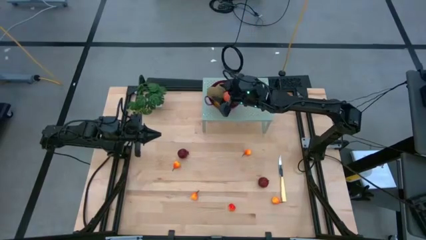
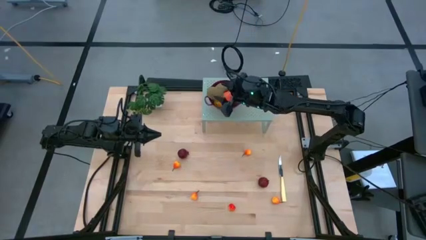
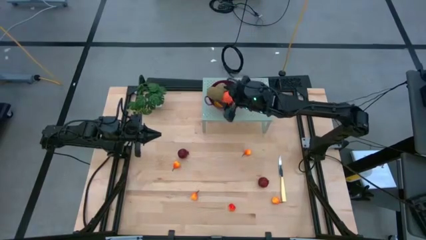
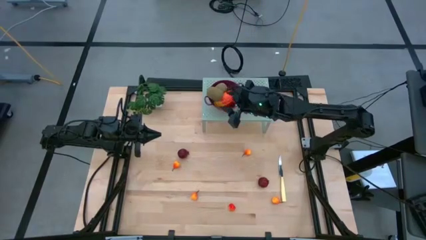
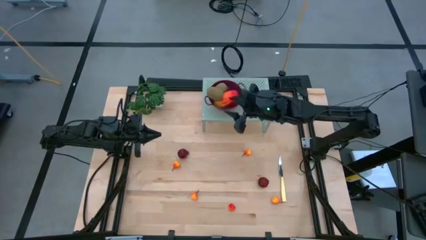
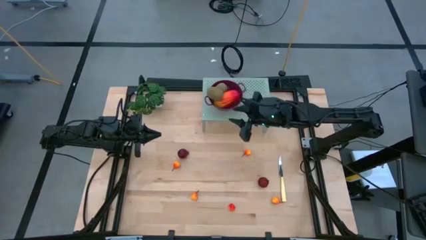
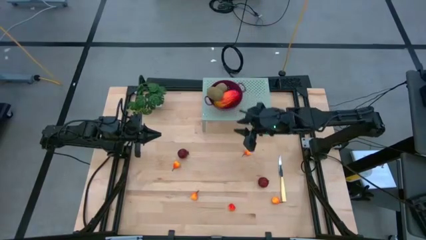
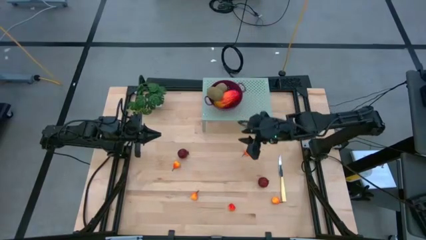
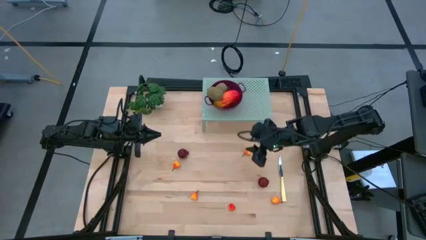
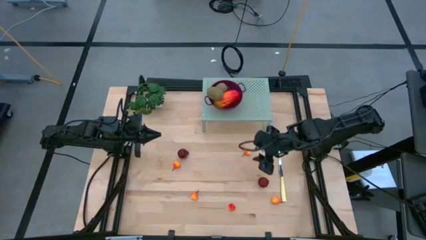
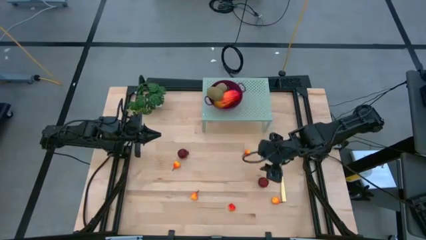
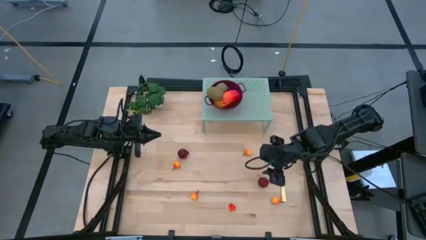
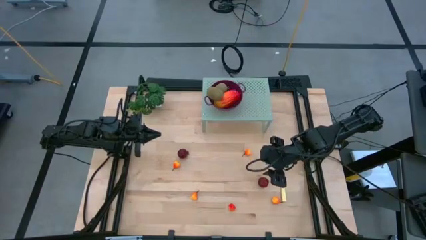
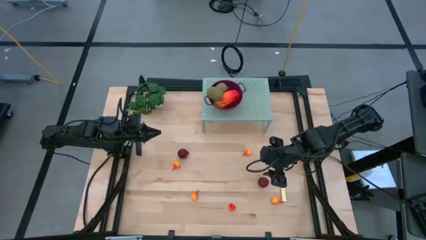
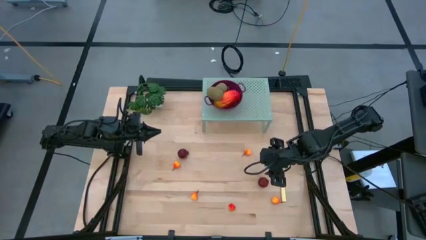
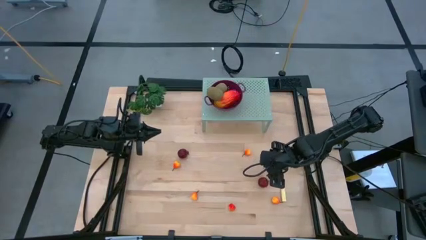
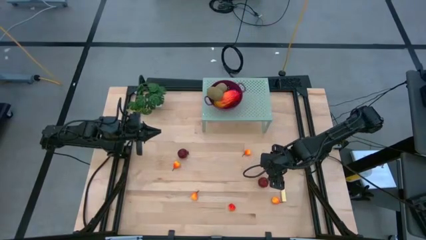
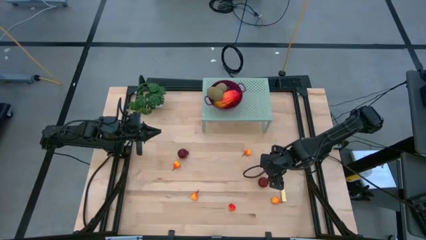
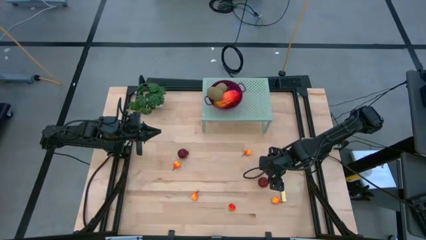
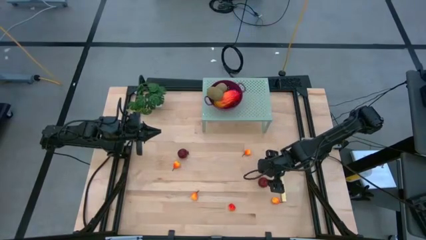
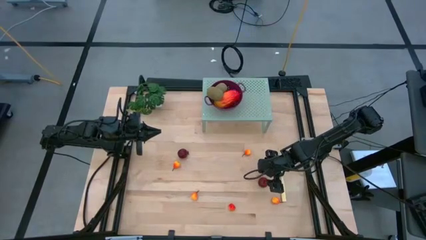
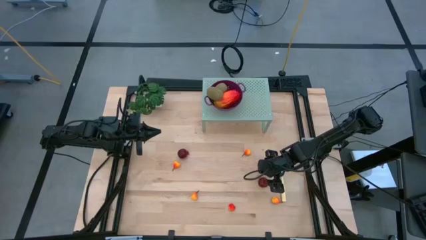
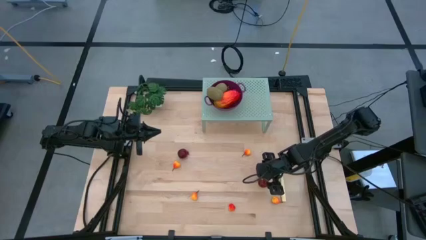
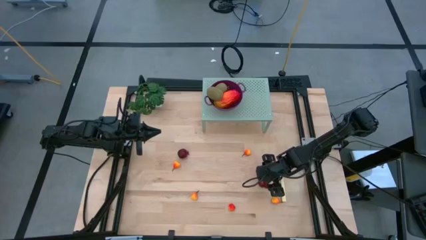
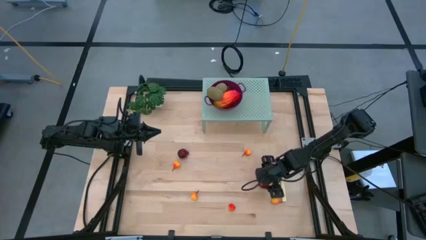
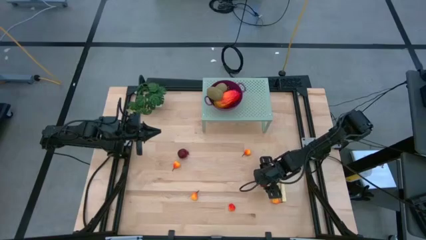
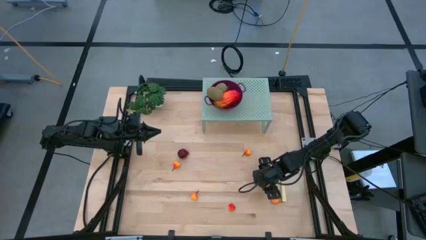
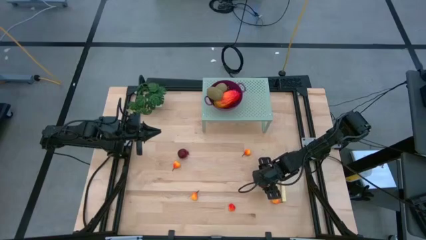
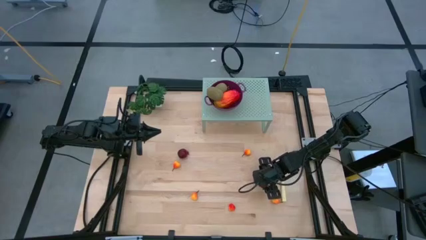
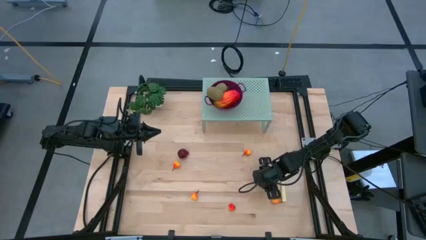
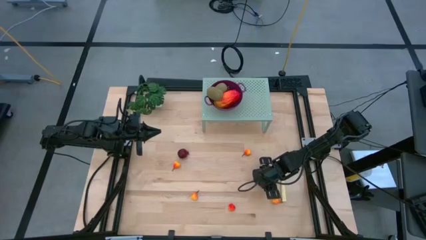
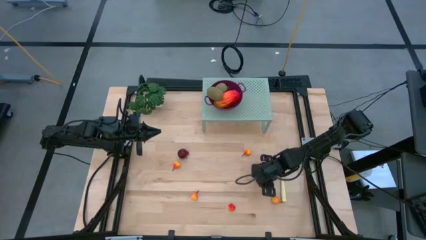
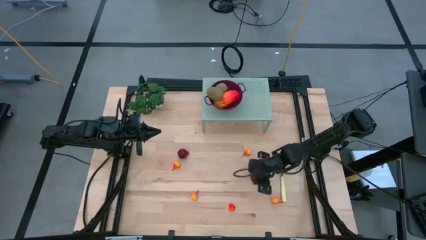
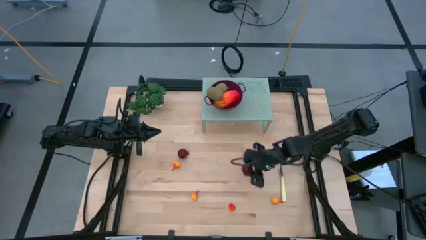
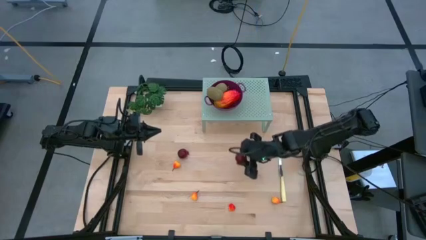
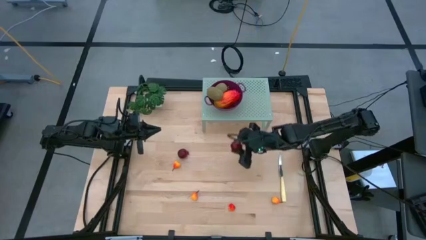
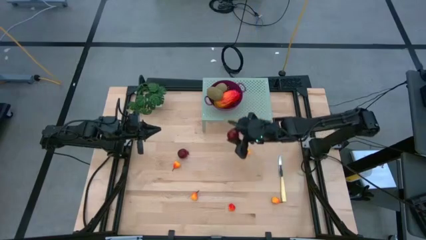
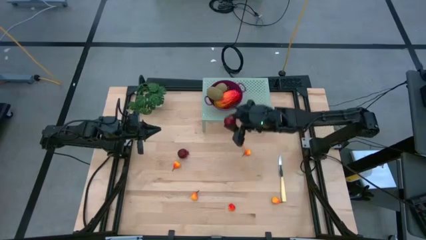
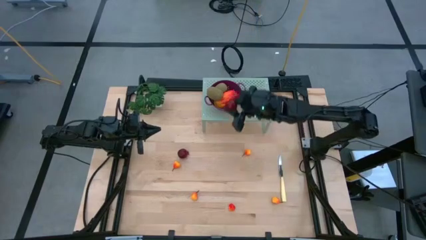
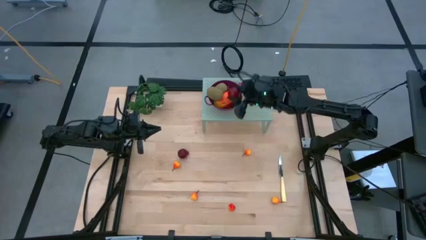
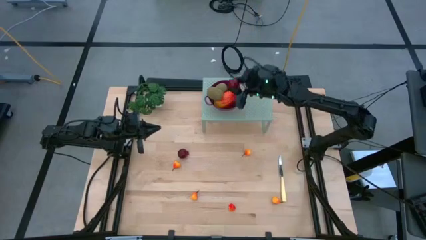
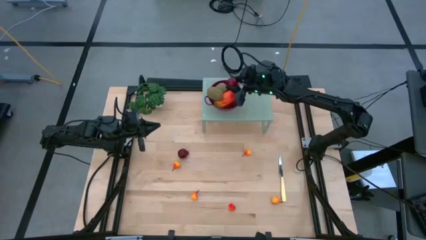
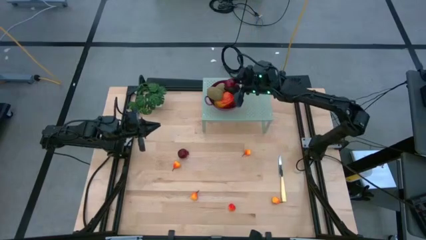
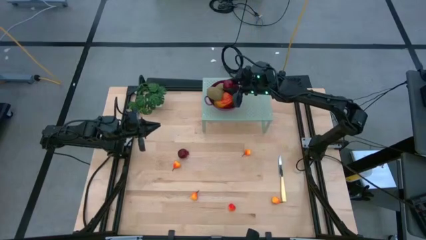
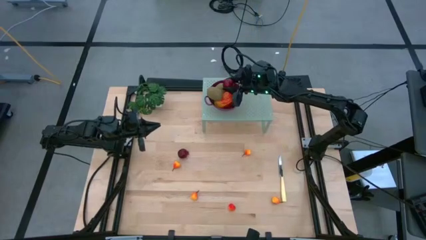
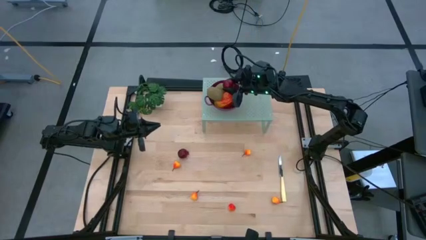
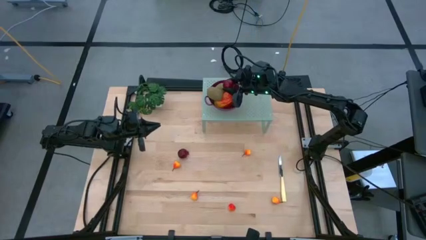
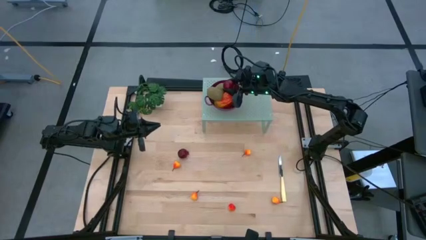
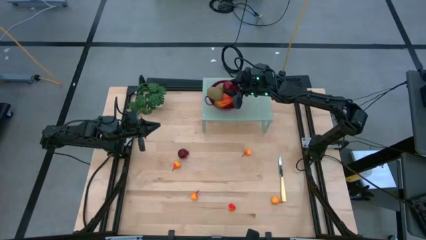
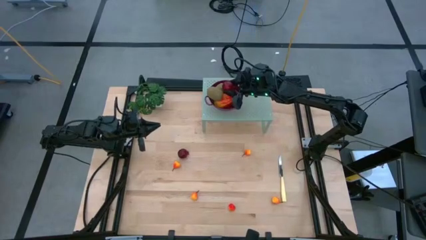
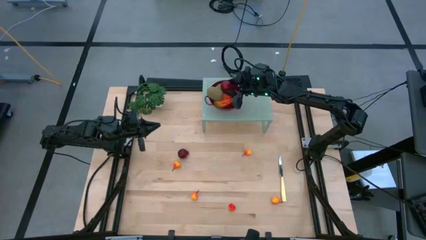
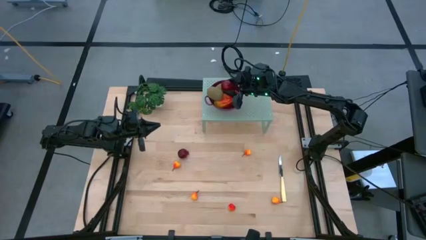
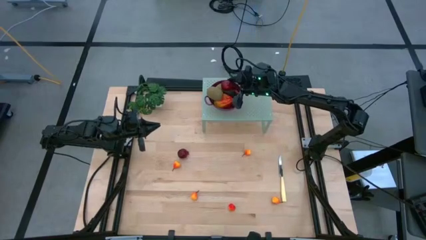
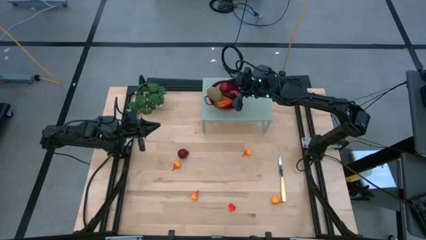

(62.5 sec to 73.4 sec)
Task: Pick & Place Fruit
Put the pomegranate in the violet strainer bowl on the shelf

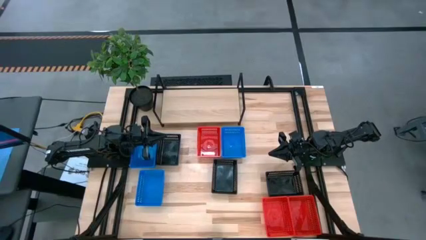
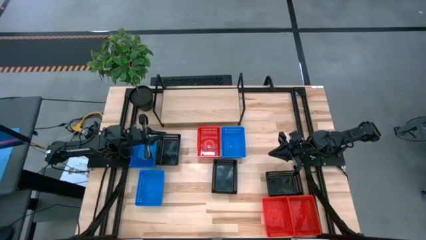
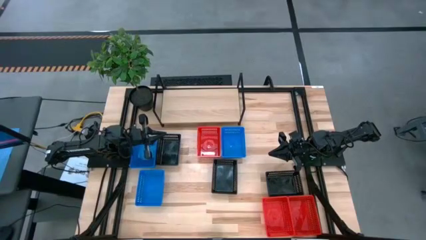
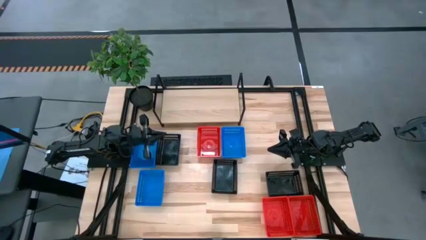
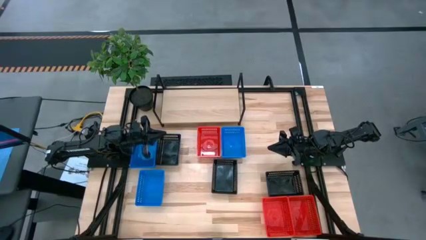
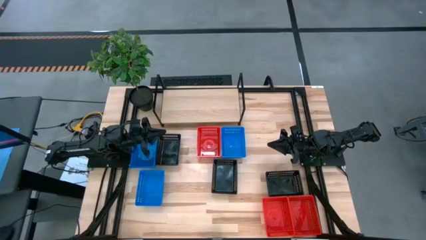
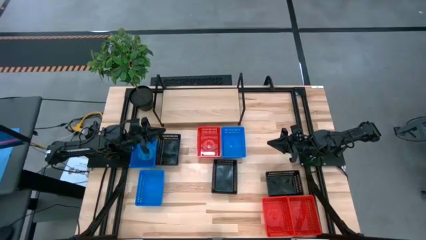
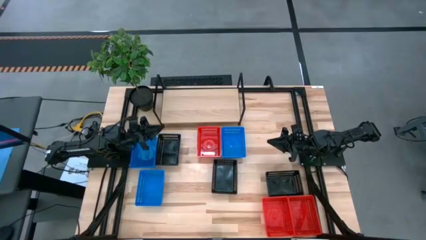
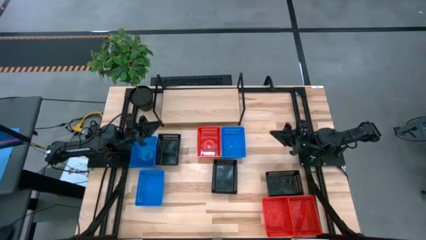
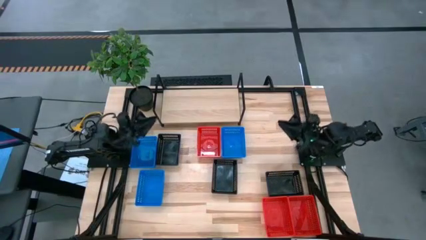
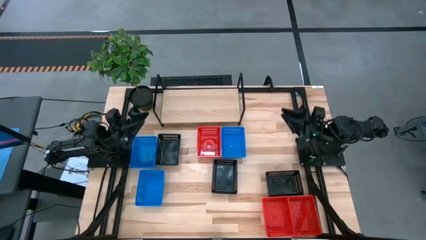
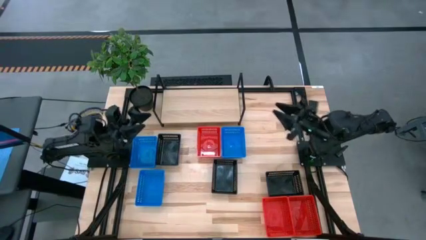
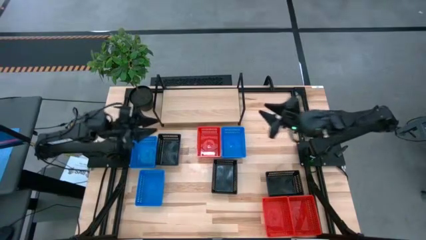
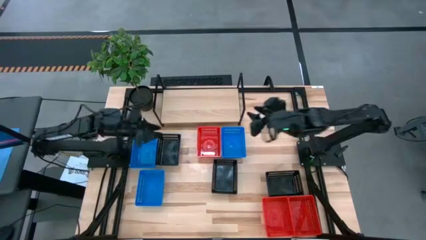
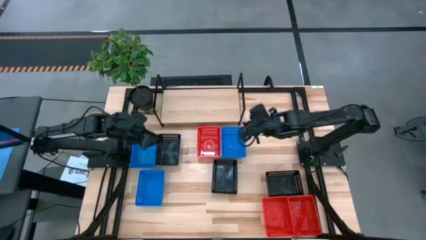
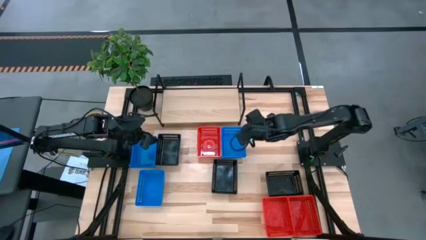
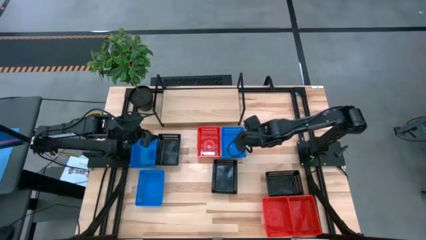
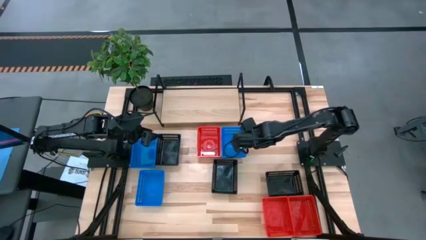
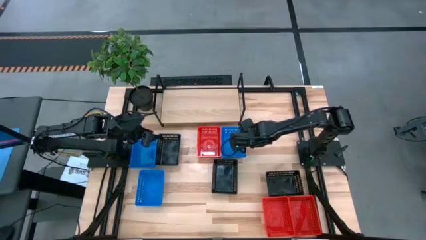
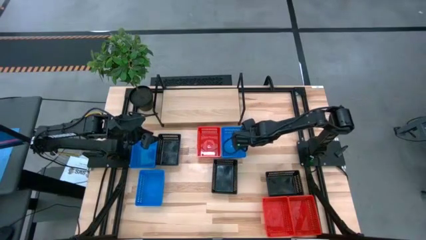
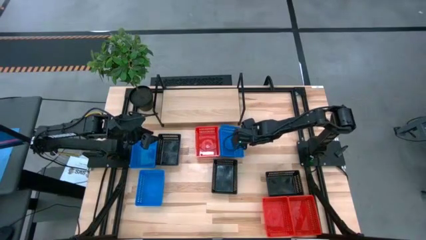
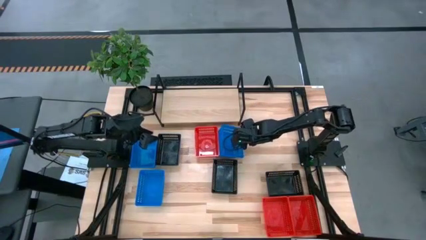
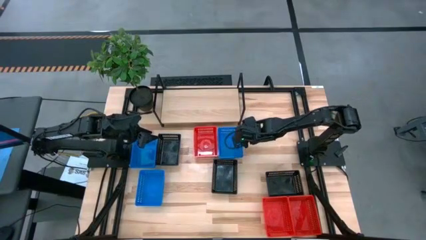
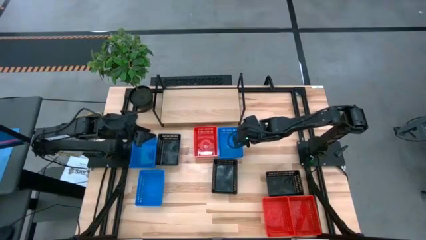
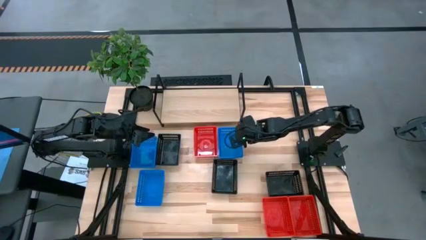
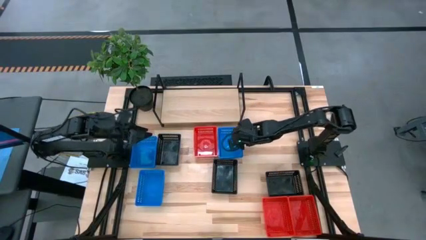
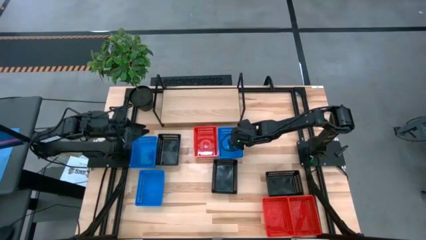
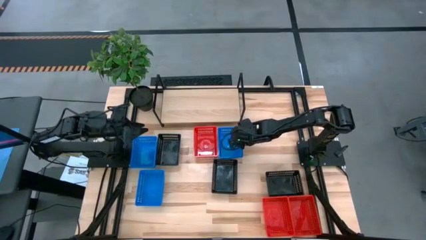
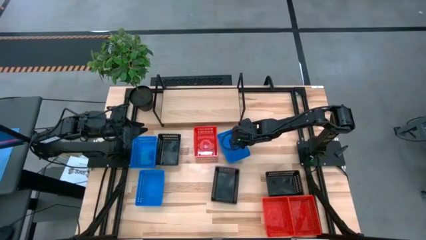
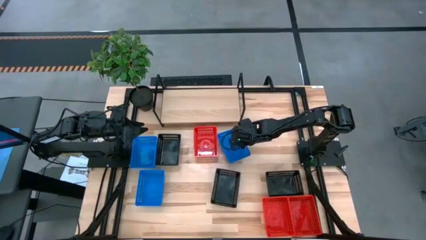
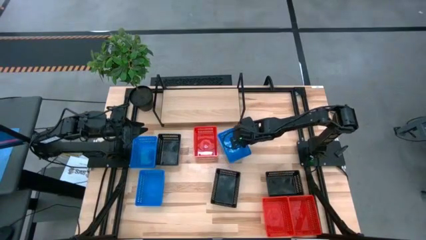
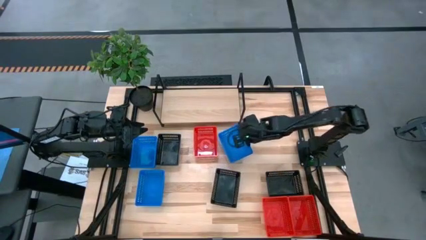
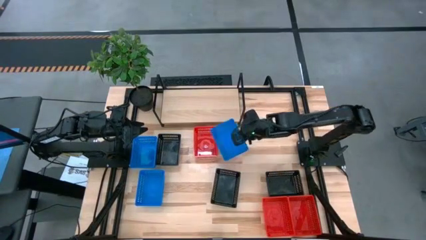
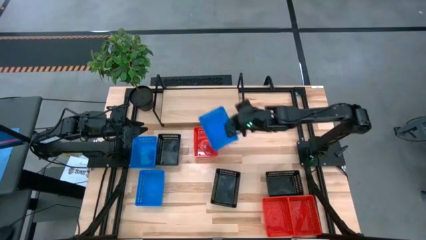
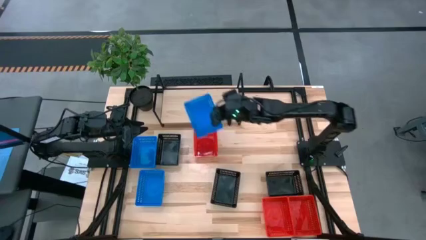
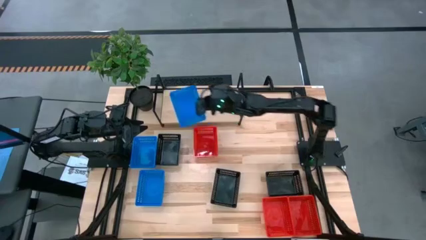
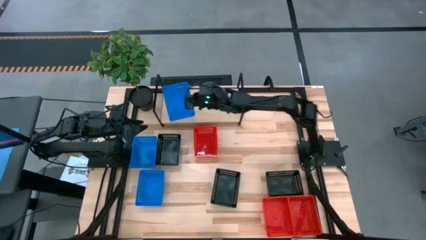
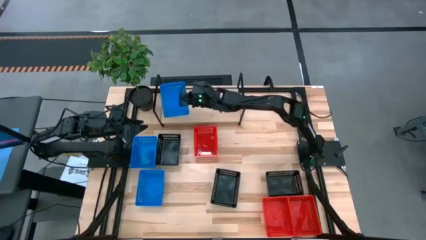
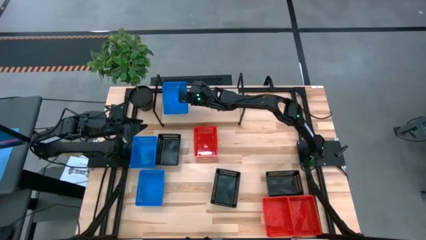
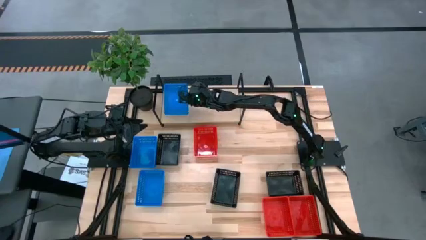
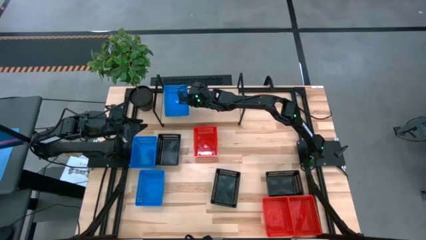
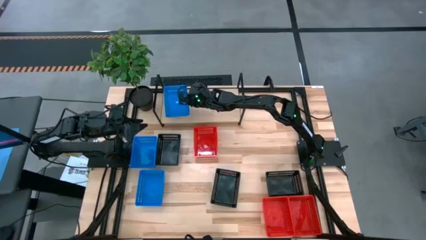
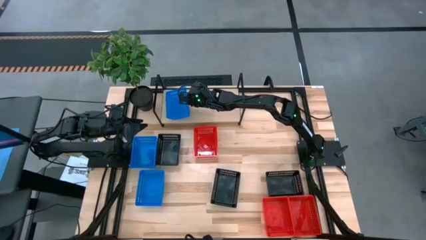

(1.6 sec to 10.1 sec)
Task: Stack baskets on shelf by color
Put the top right blue bin on the shelf
